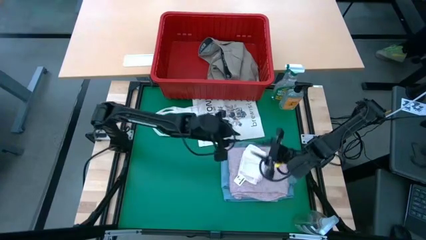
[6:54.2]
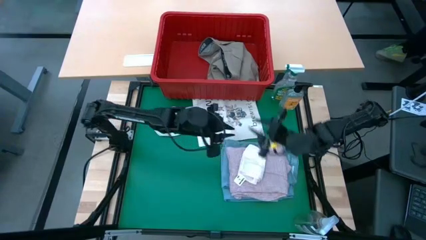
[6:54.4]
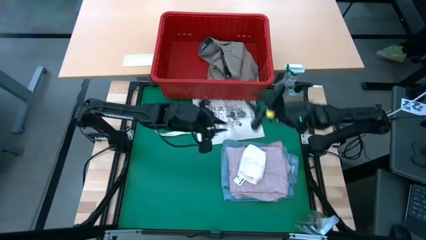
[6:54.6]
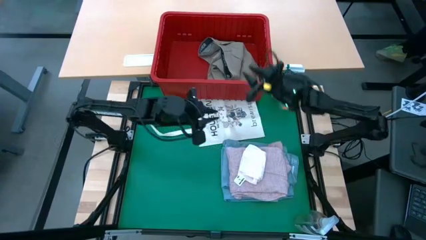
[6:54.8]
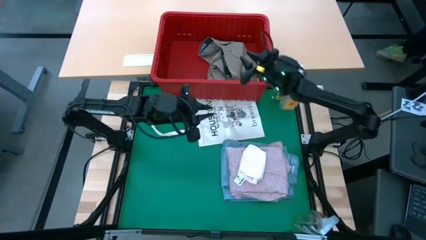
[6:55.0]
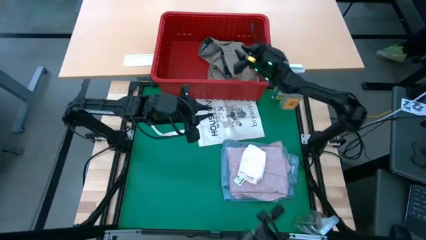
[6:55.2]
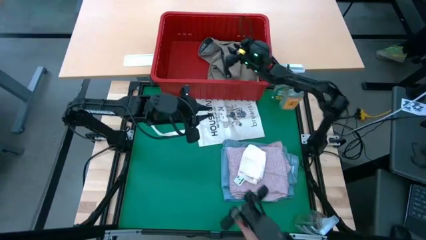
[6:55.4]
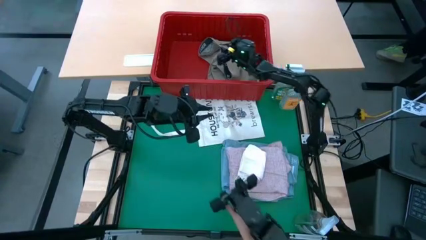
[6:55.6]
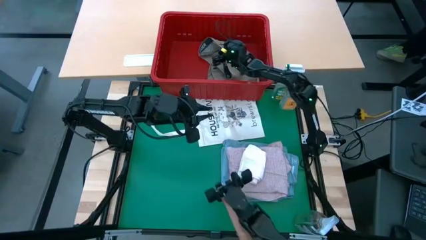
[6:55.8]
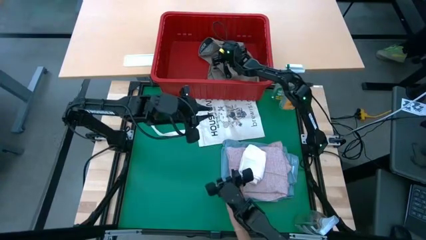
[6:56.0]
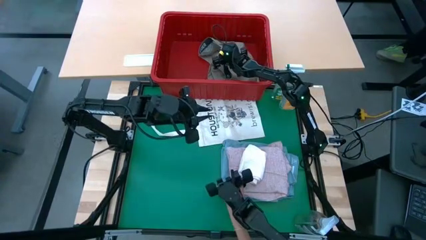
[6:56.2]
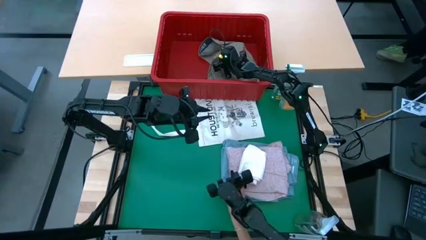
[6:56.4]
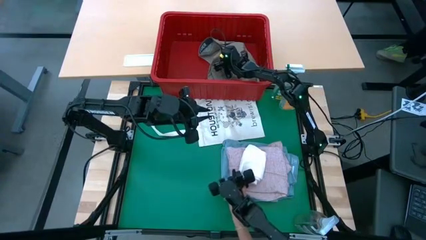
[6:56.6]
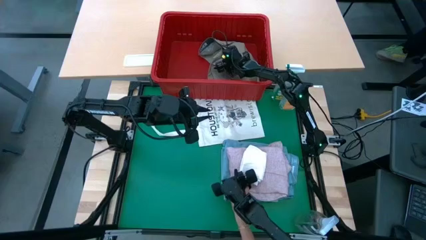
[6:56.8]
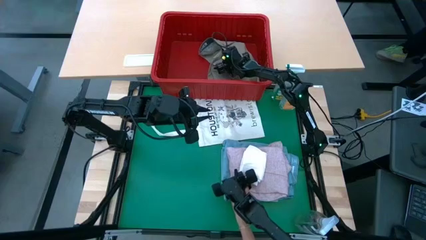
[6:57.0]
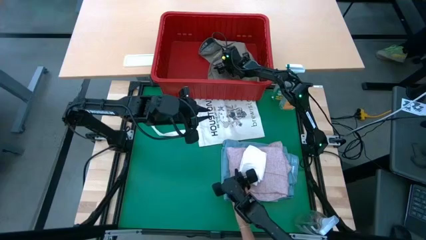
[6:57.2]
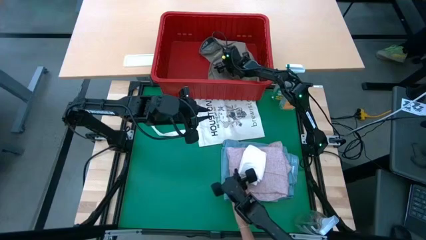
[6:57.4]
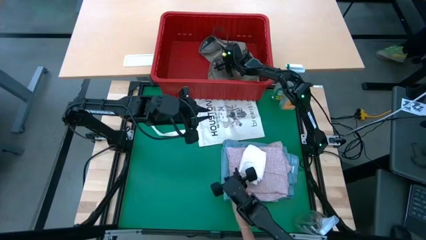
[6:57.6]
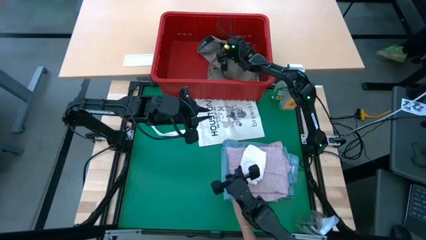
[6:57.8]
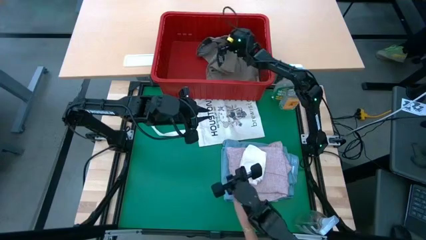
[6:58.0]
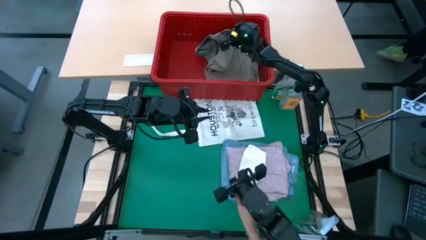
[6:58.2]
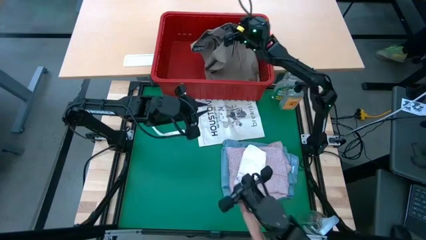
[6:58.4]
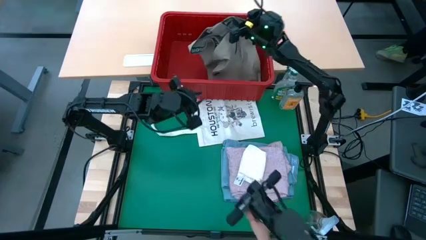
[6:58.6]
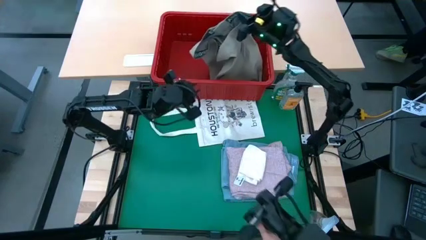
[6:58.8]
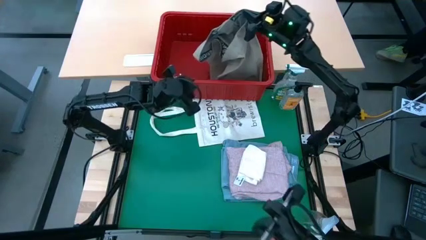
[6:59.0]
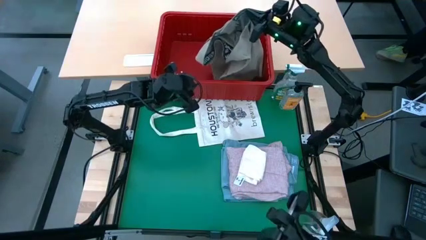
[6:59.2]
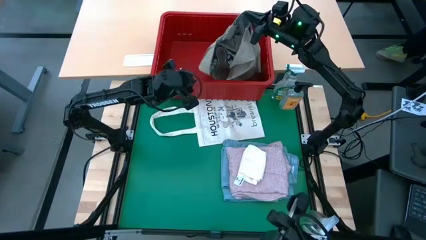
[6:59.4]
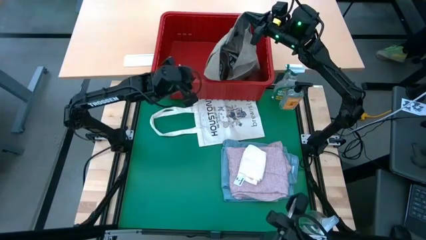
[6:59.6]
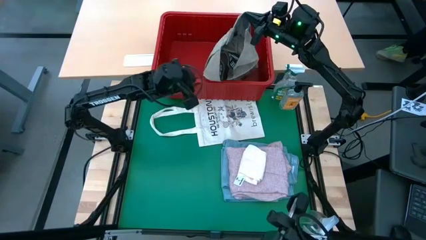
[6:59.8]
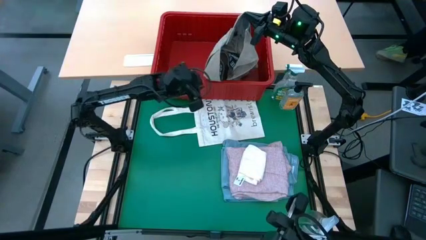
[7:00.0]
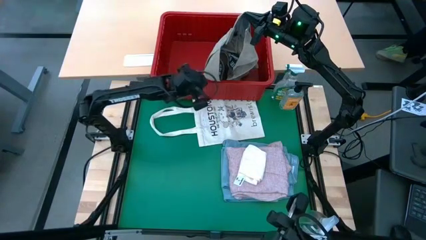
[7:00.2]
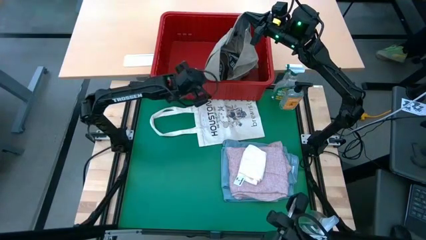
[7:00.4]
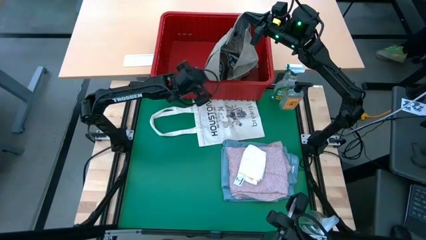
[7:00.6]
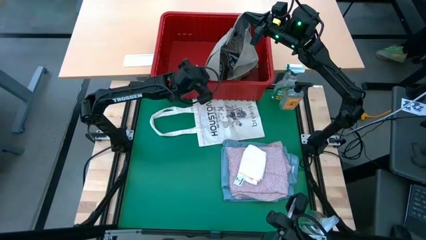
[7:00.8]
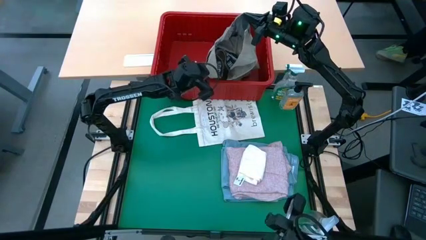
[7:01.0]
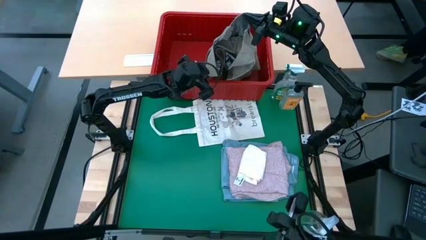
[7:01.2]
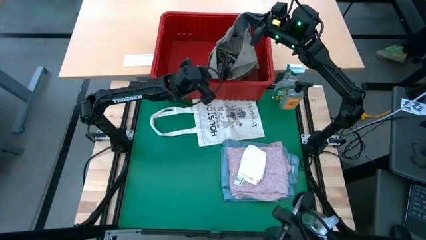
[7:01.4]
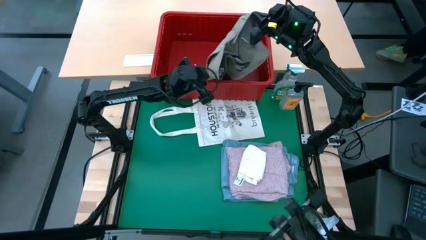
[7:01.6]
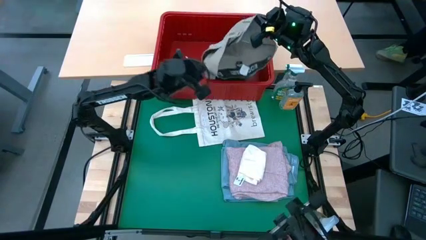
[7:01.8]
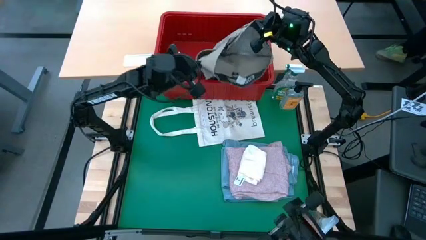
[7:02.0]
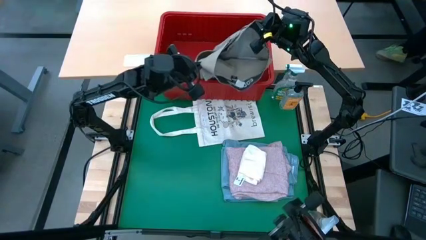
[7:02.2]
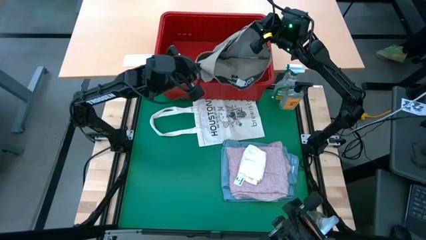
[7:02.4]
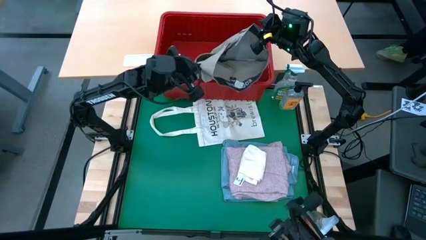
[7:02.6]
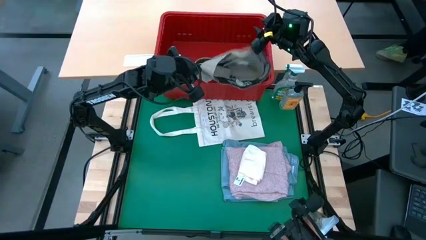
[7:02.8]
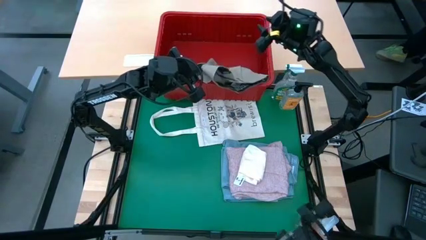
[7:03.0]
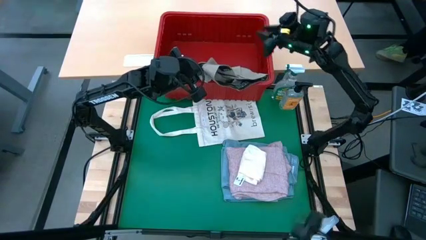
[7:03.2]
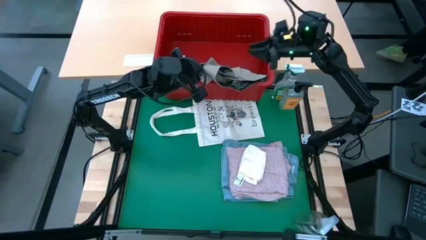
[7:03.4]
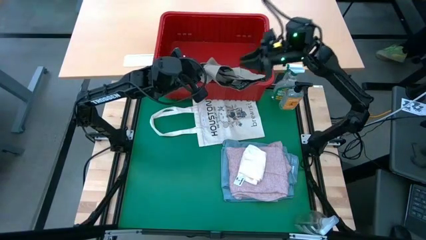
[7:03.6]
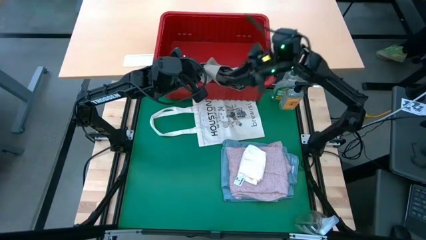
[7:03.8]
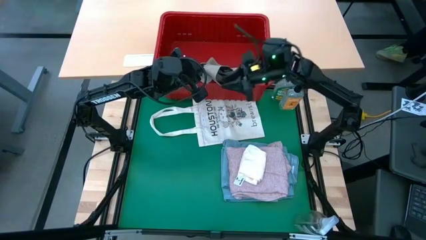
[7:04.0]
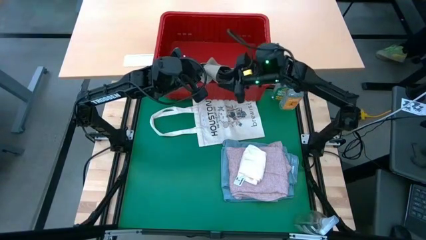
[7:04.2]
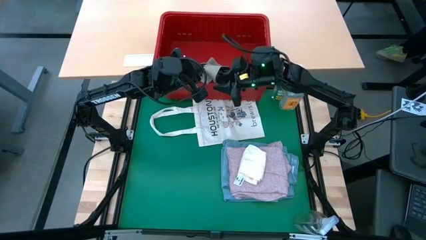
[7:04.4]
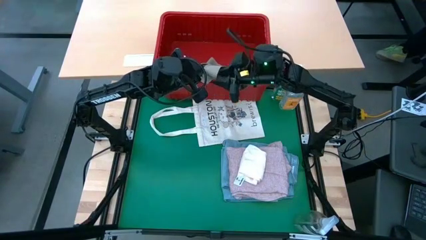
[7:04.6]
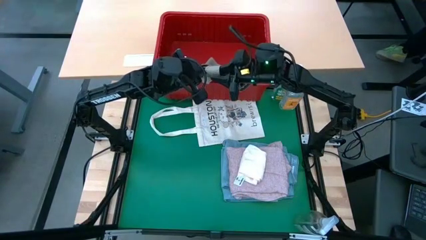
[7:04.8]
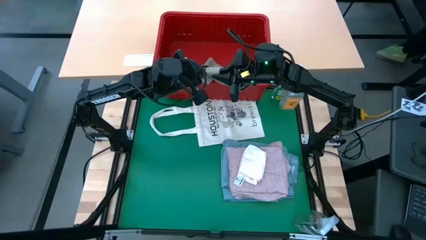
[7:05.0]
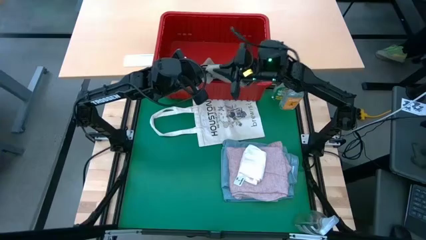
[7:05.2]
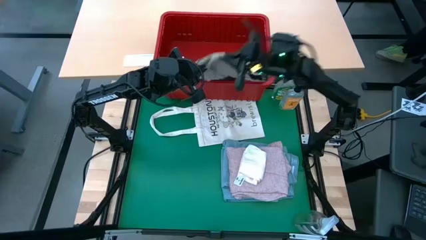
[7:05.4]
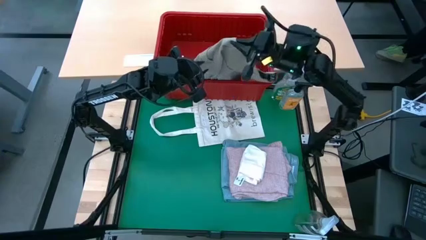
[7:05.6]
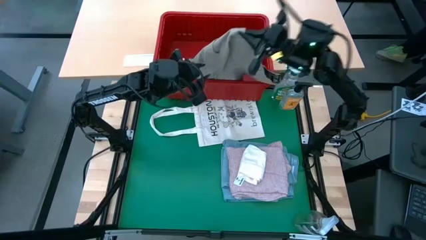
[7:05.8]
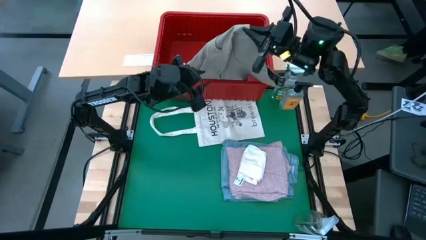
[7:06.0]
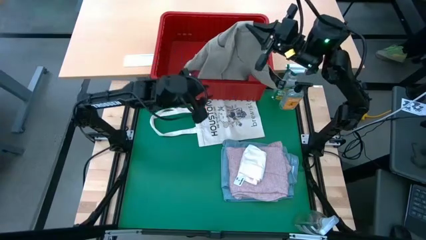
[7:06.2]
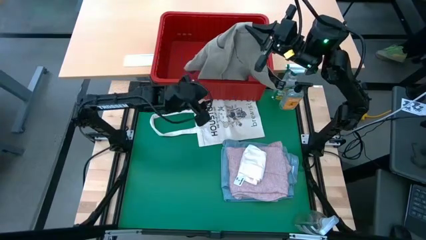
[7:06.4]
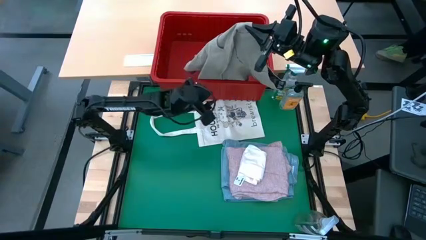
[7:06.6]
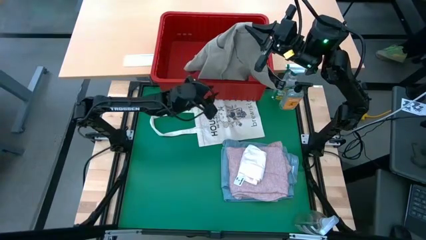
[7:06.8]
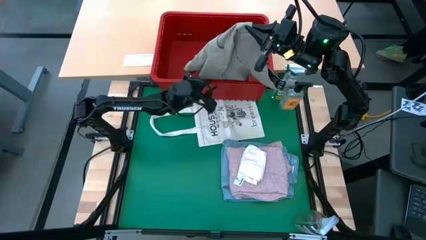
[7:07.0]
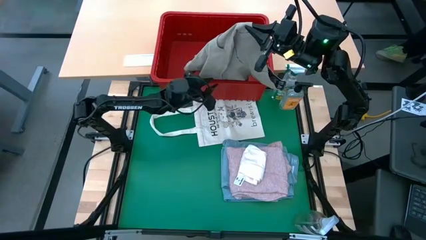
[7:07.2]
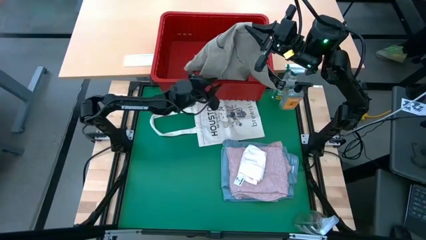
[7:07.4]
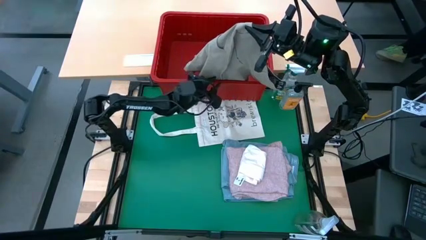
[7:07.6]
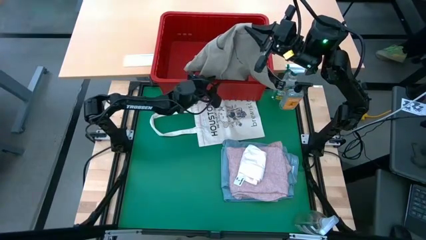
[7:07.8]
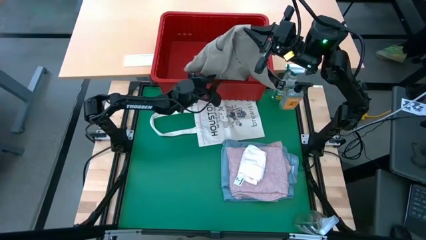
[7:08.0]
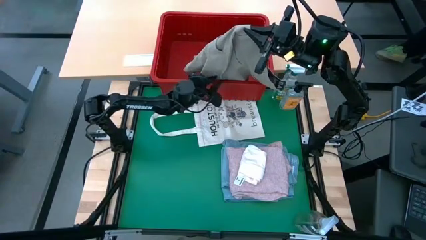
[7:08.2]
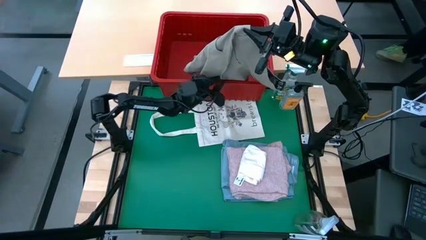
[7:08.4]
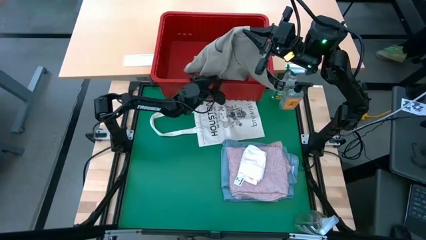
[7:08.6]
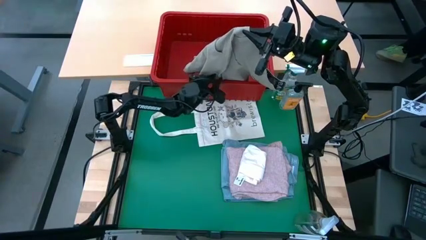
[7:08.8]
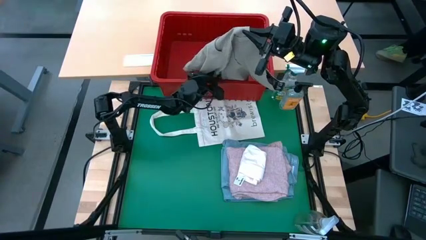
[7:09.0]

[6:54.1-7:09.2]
Task: Fold Laundry from Bin
Fold the light brown shorts from the red laundry basket
